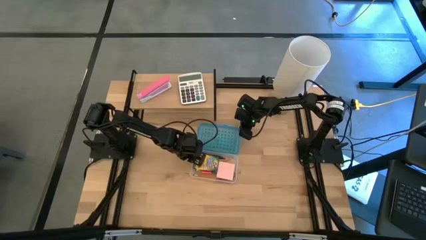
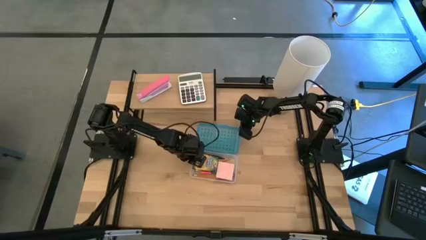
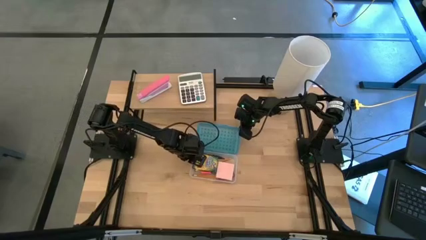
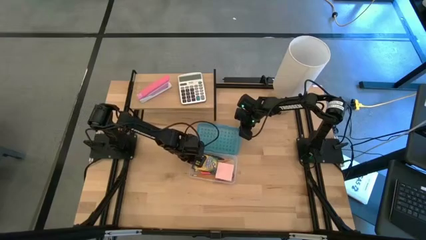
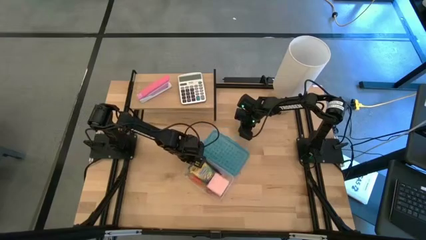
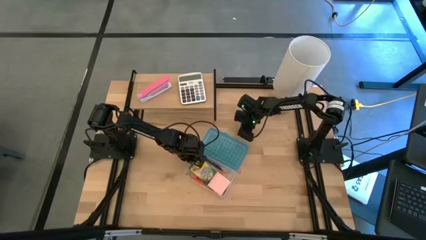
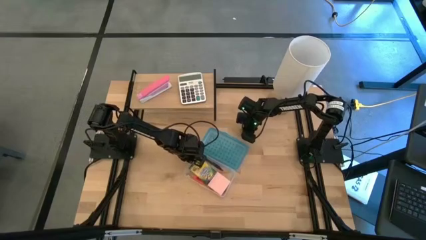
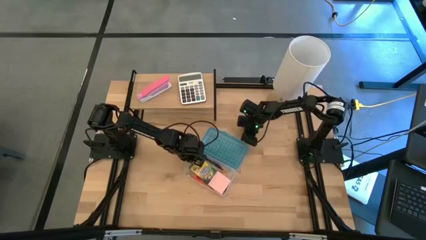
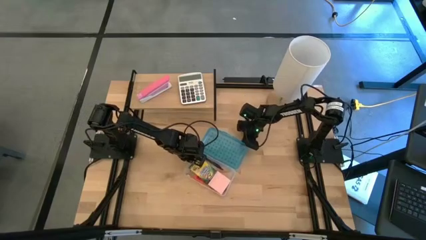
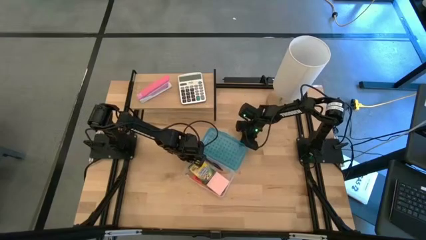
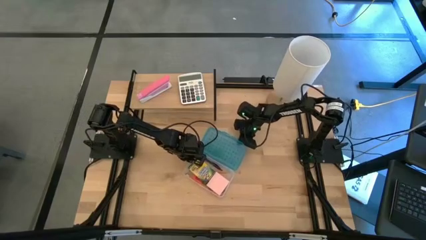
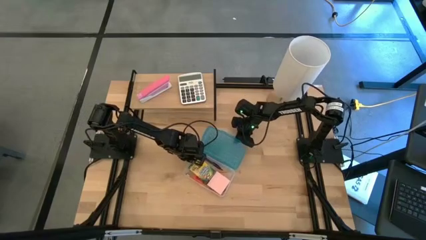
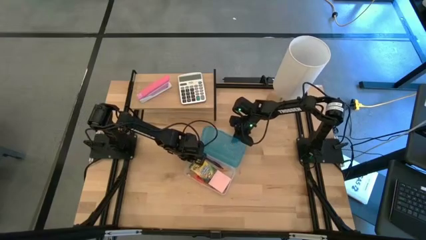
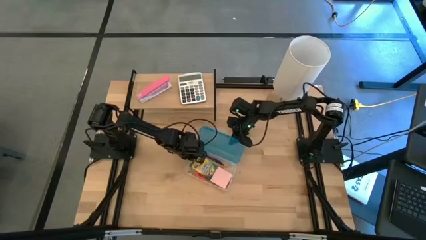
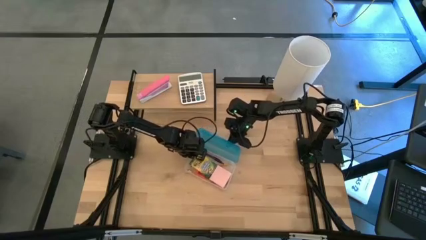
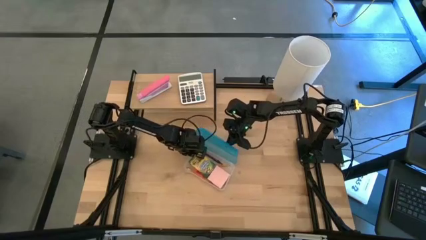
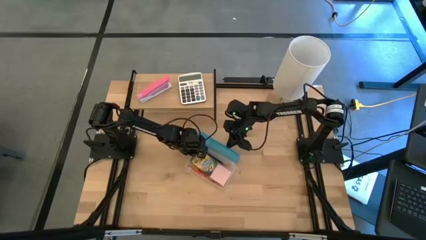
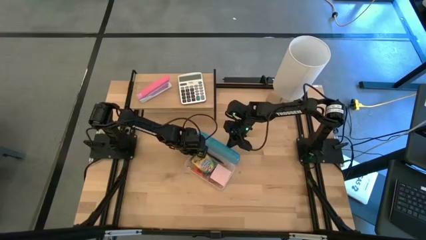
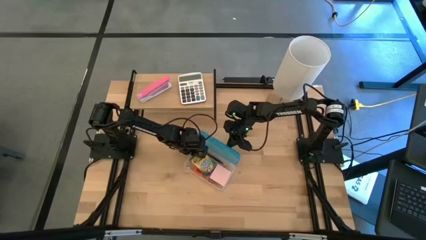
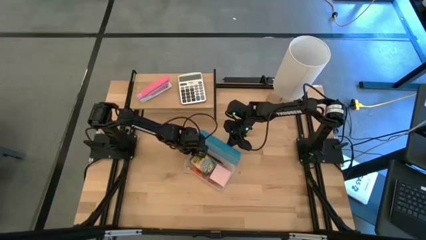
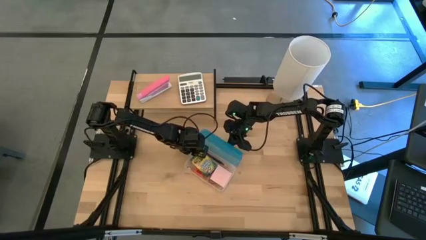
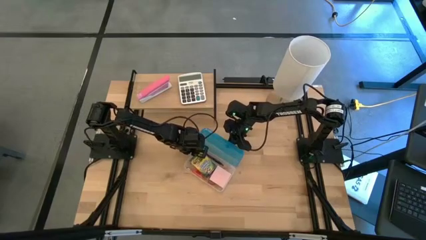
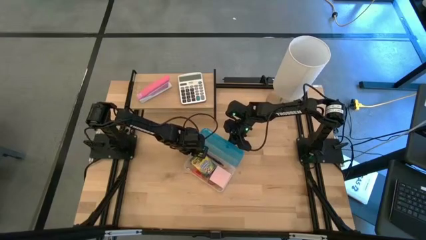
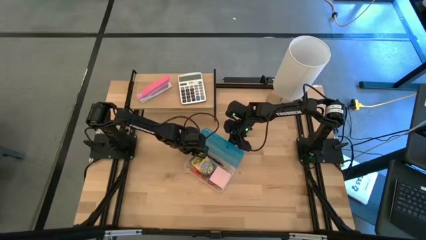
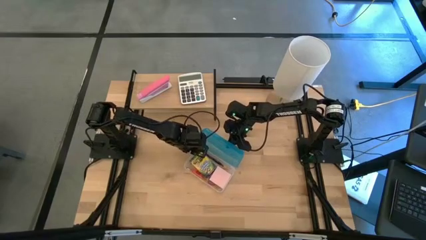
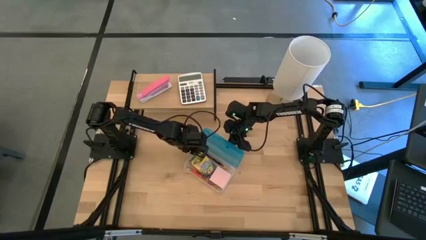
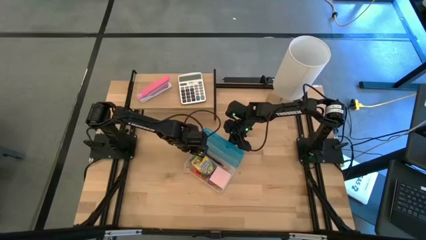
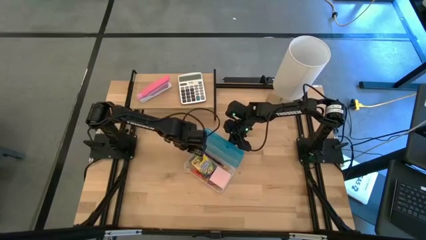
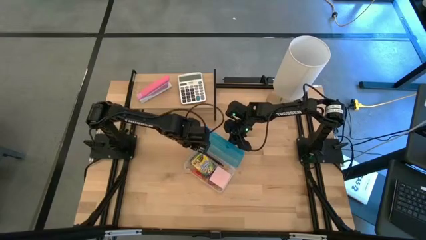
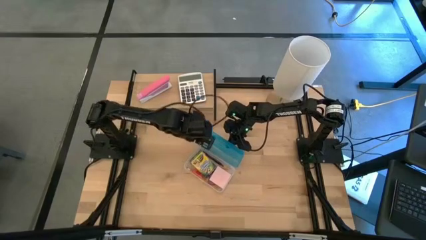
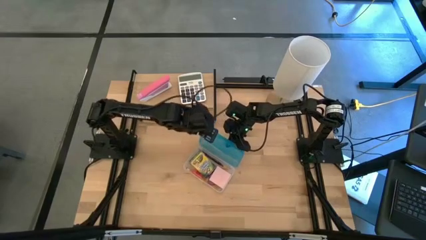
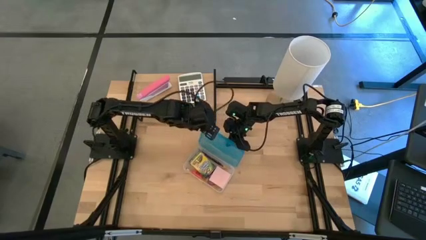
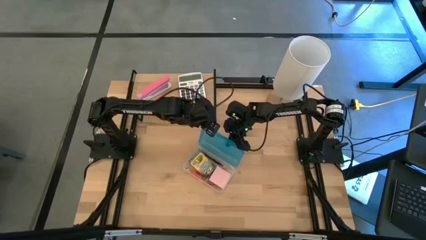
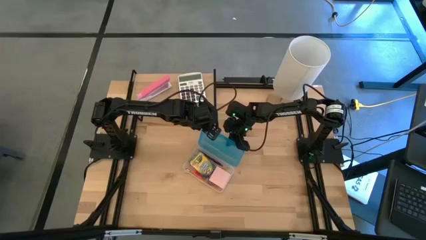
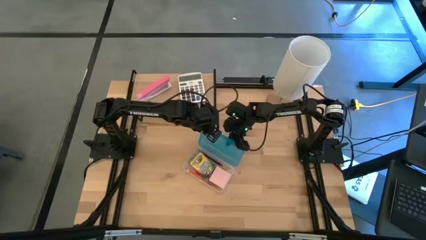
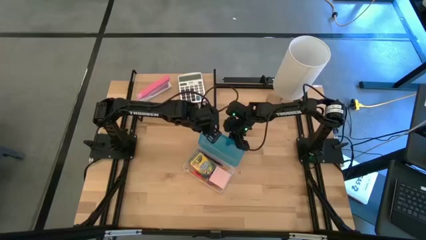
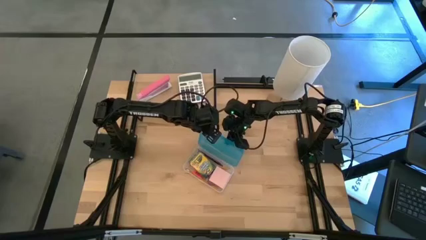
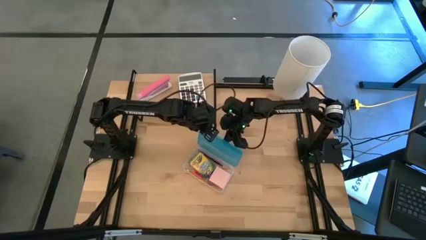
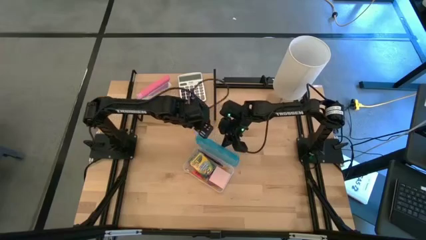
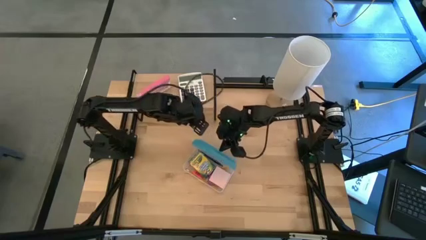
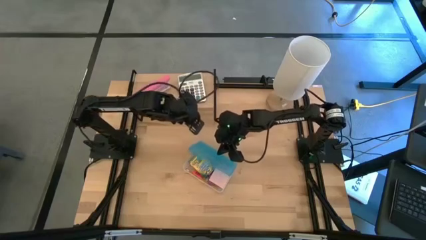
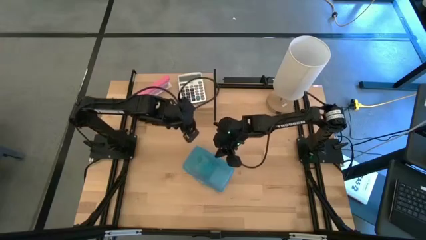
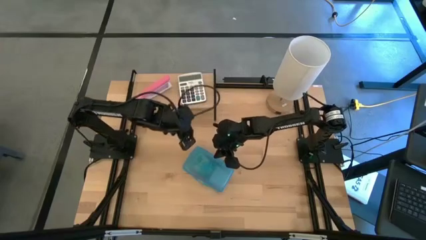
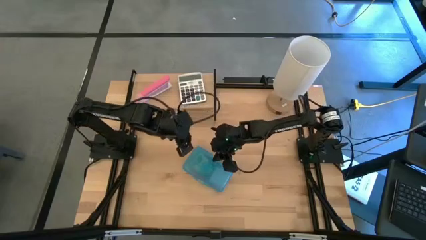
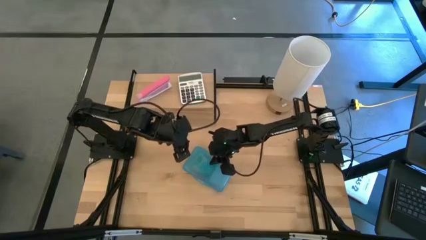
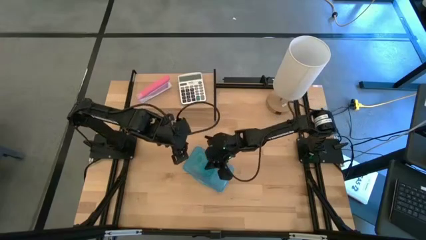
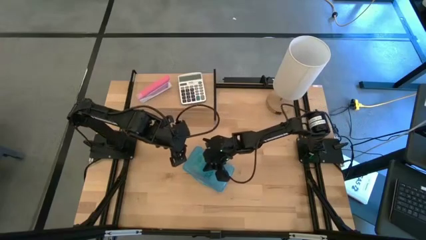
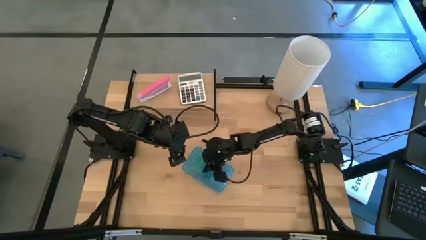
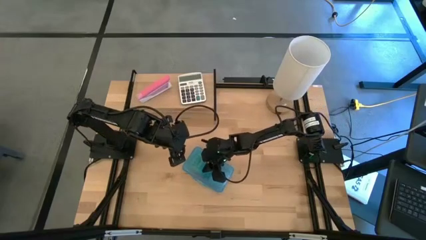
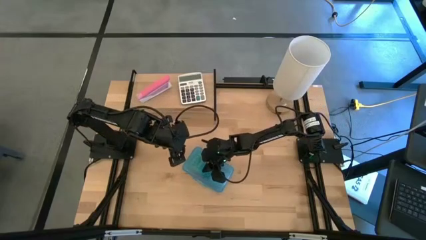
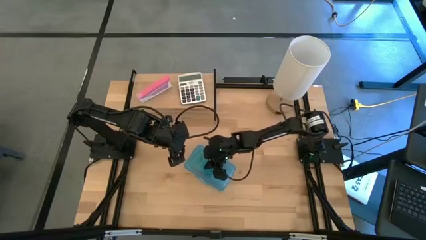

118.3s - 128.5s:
Task: Pack school essentials
Close the blue supply box

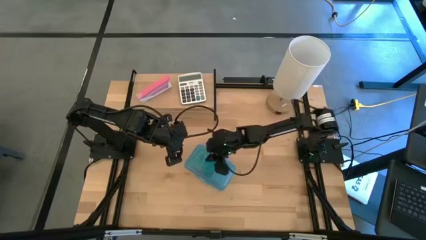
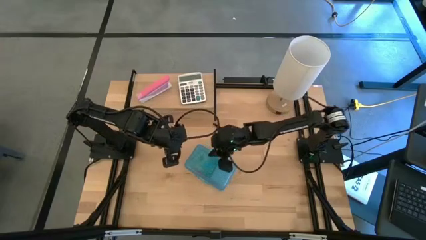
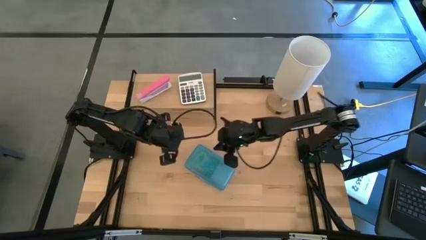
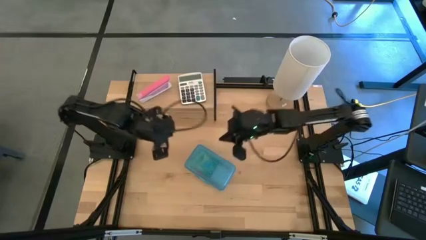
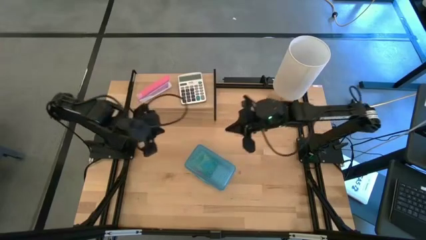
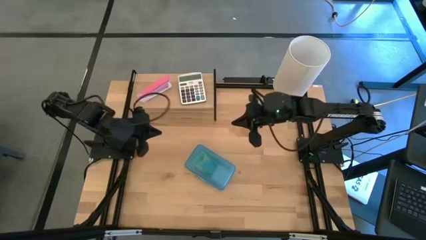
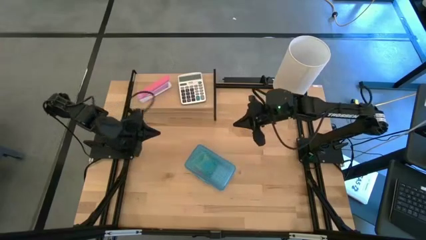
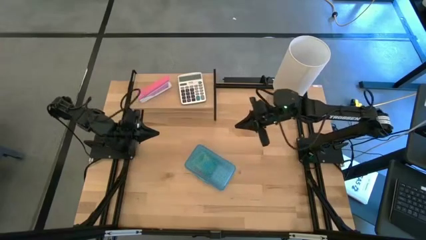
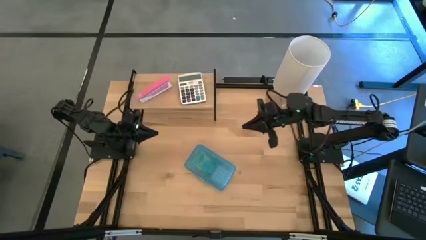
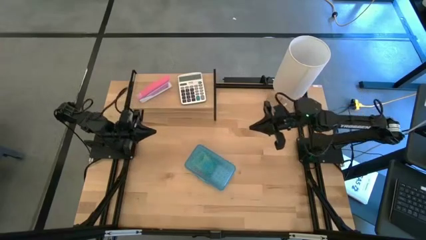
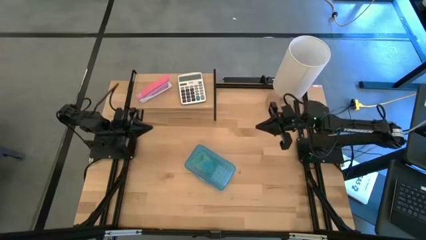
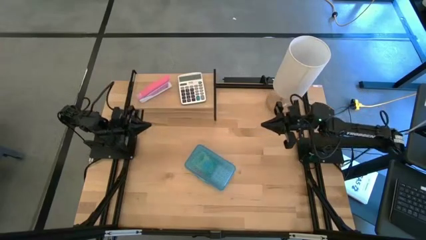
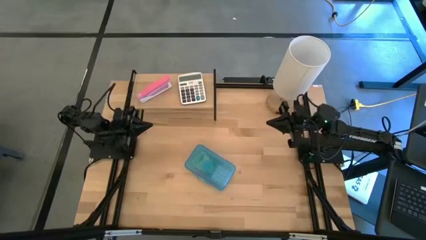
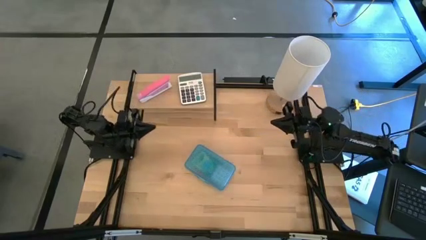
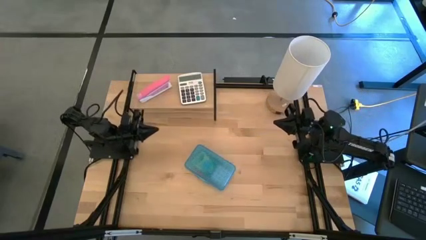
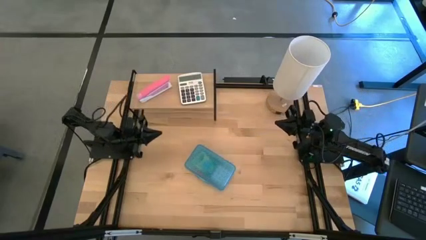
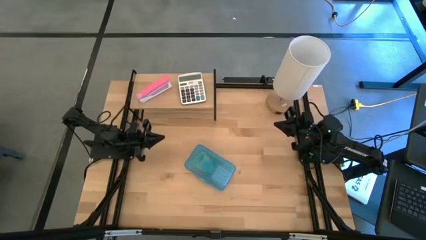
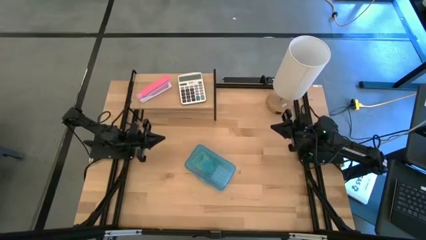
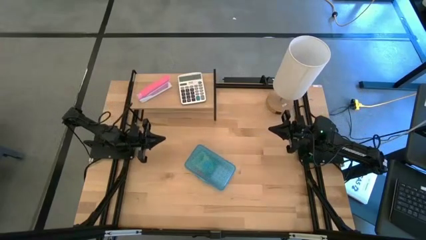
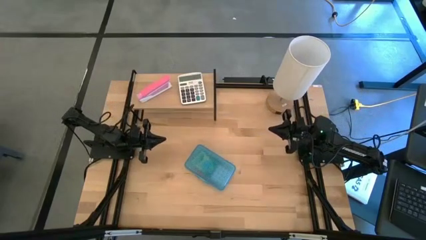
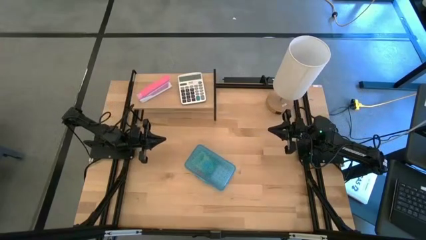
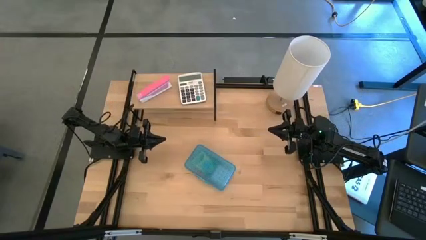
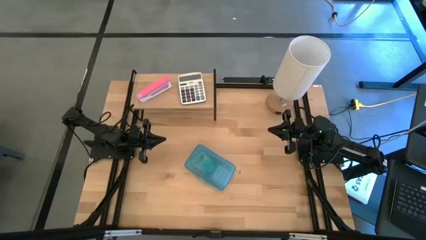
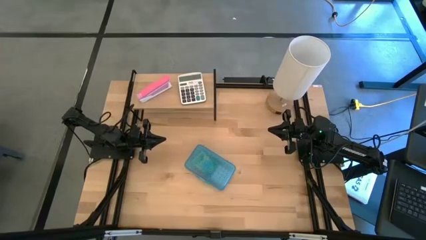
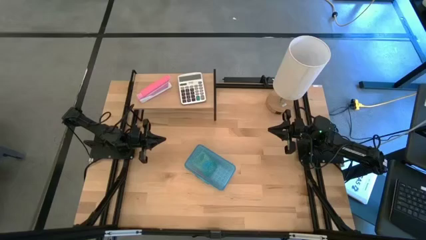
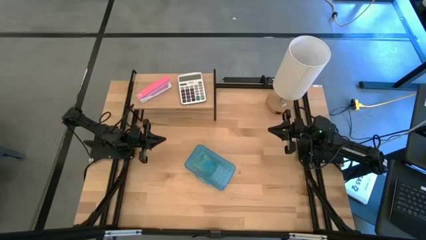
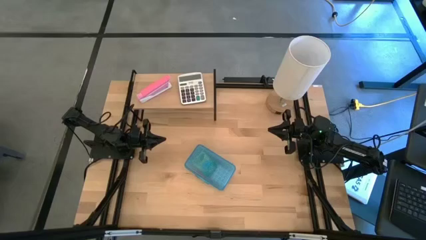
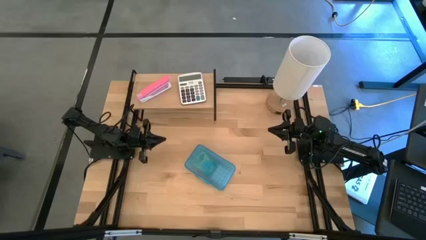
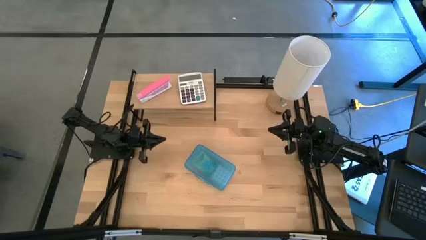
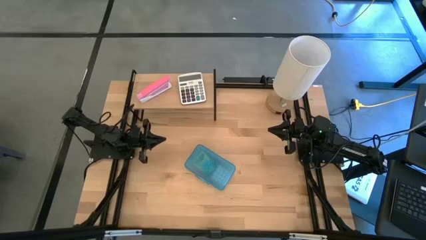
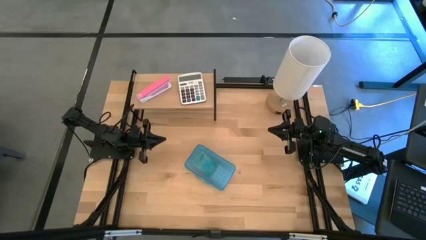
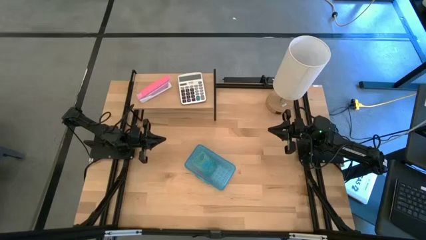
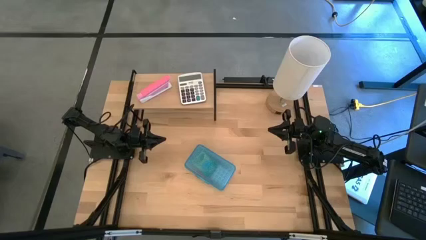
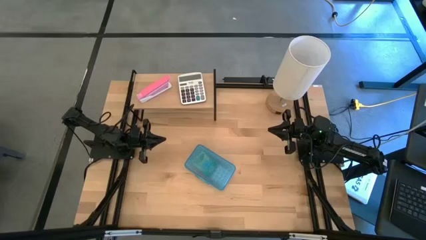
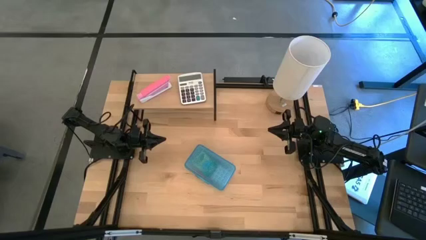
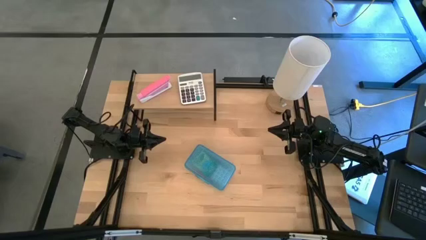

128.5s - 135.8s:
Return to Home Position
